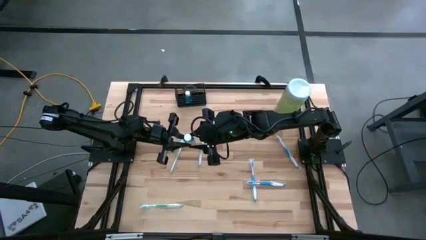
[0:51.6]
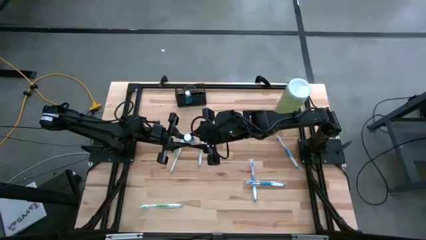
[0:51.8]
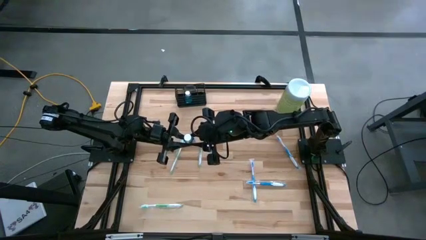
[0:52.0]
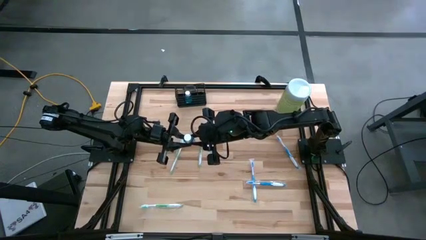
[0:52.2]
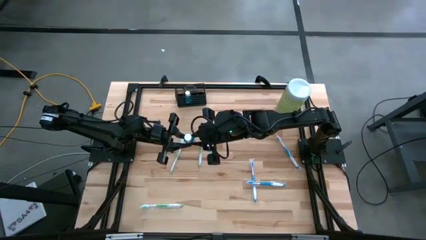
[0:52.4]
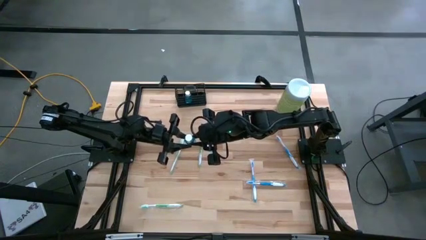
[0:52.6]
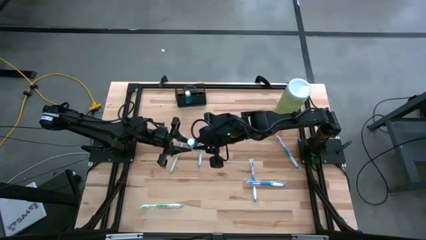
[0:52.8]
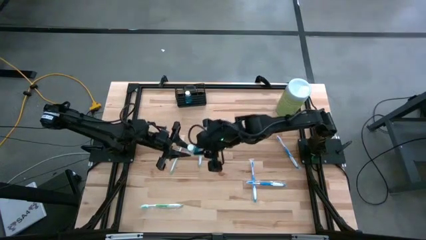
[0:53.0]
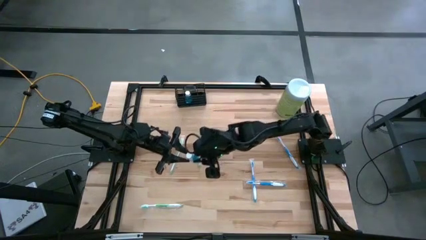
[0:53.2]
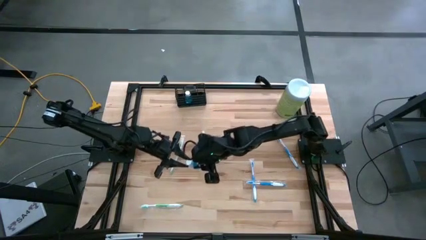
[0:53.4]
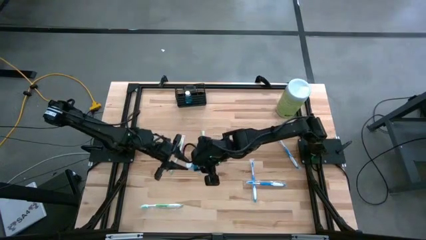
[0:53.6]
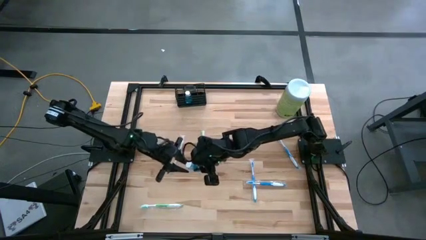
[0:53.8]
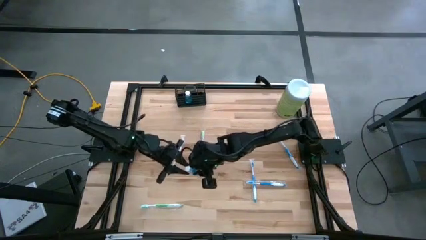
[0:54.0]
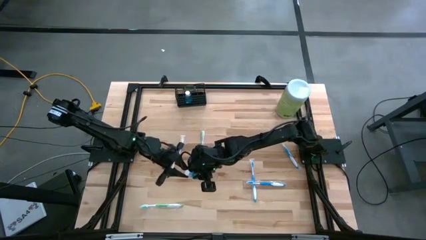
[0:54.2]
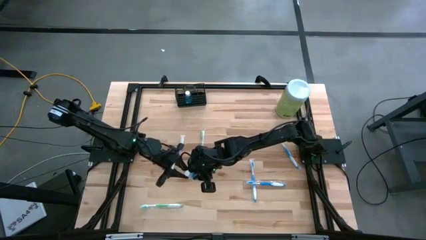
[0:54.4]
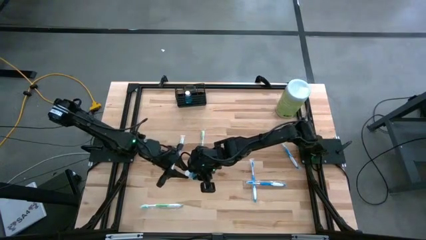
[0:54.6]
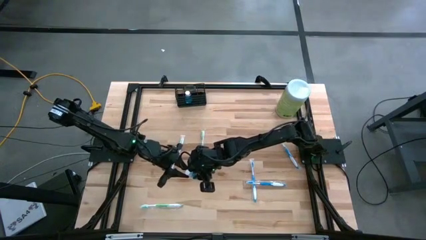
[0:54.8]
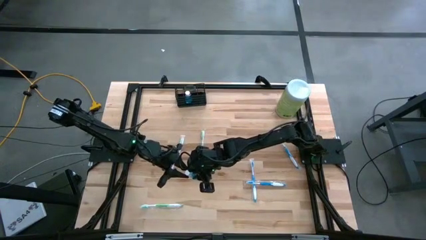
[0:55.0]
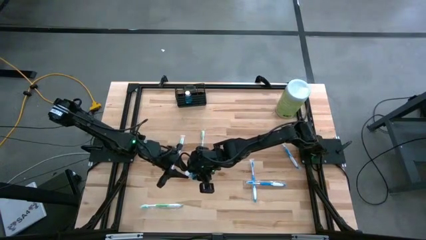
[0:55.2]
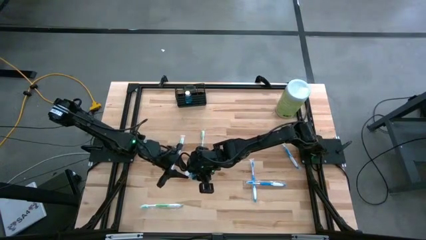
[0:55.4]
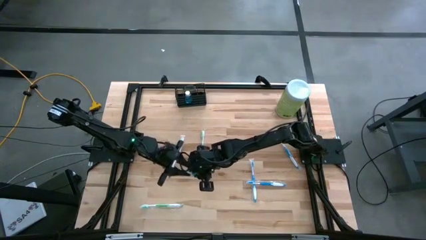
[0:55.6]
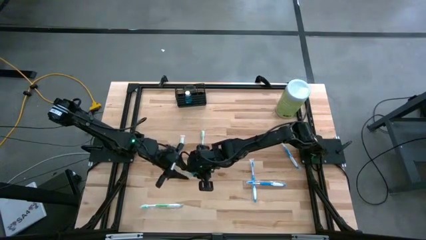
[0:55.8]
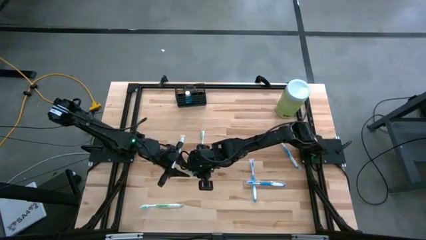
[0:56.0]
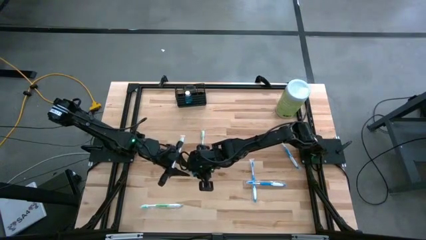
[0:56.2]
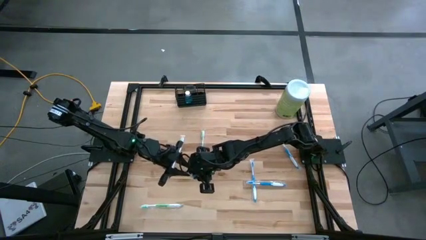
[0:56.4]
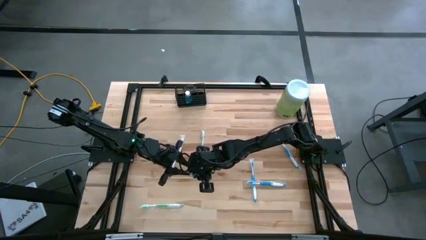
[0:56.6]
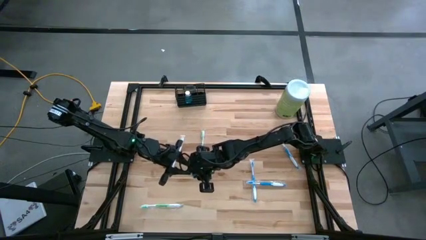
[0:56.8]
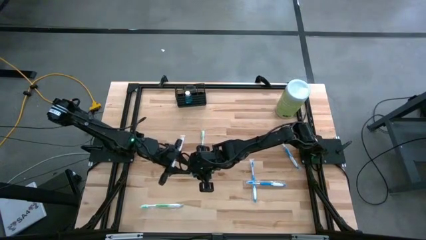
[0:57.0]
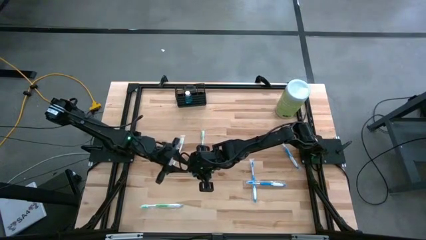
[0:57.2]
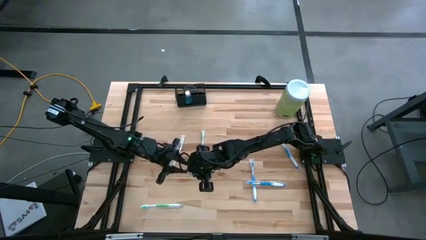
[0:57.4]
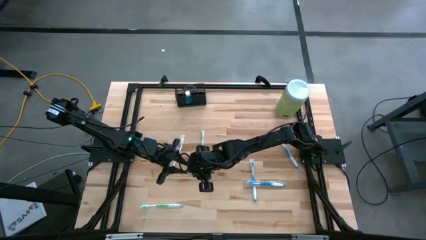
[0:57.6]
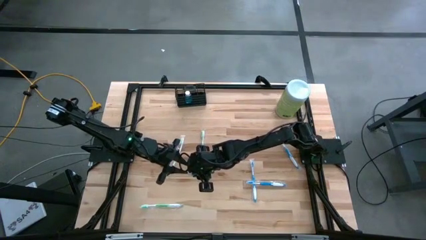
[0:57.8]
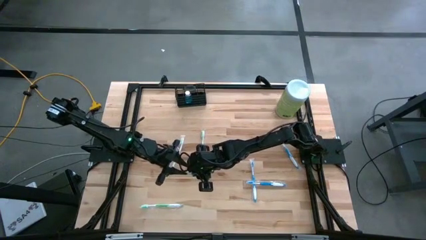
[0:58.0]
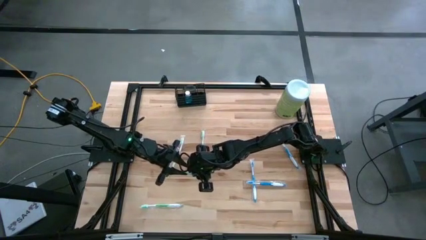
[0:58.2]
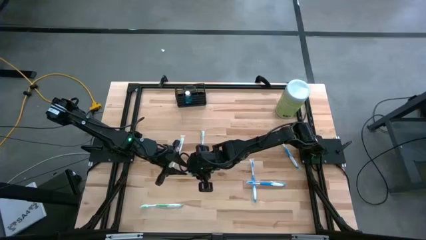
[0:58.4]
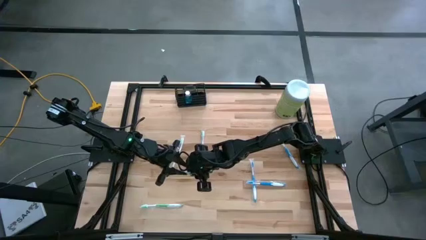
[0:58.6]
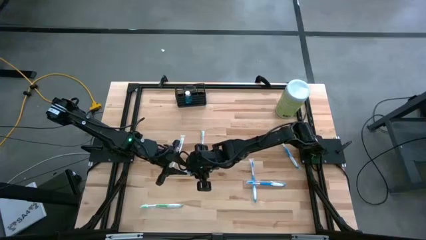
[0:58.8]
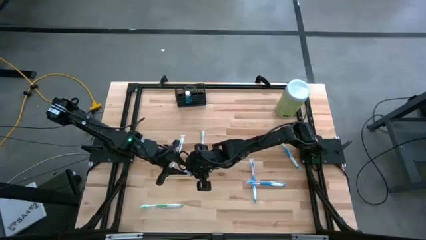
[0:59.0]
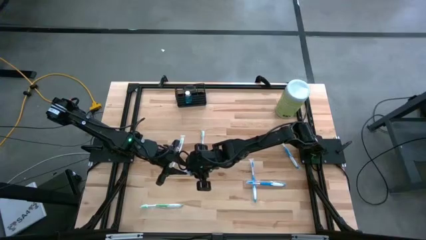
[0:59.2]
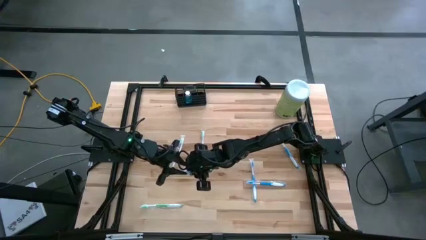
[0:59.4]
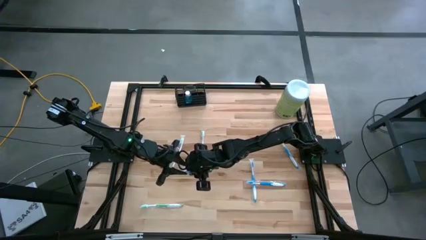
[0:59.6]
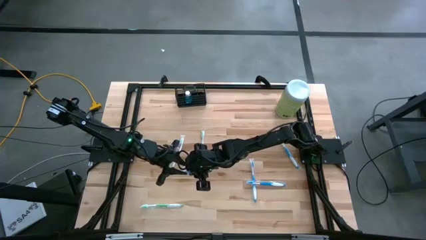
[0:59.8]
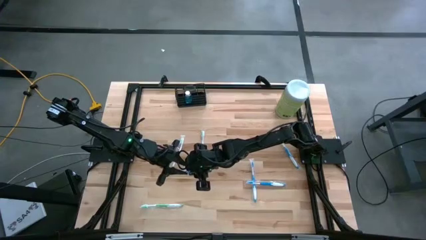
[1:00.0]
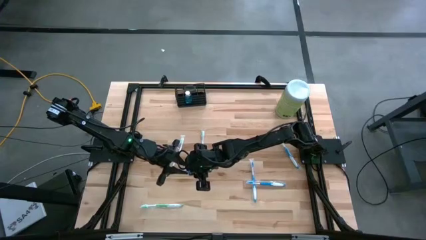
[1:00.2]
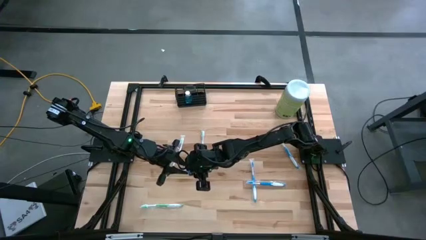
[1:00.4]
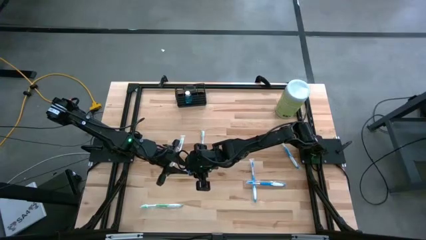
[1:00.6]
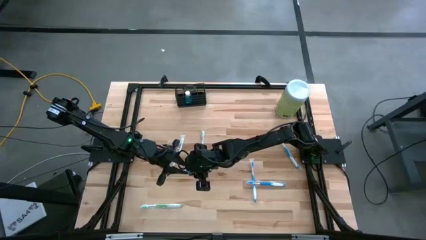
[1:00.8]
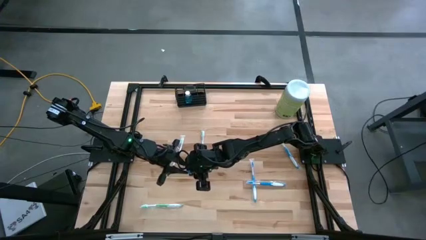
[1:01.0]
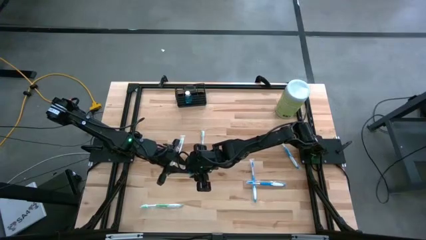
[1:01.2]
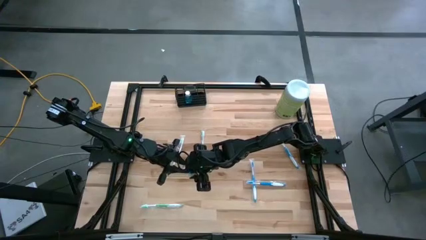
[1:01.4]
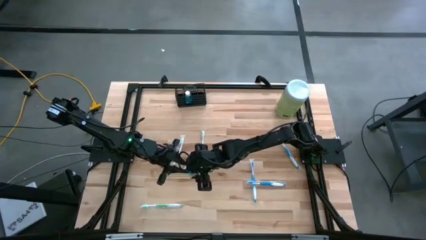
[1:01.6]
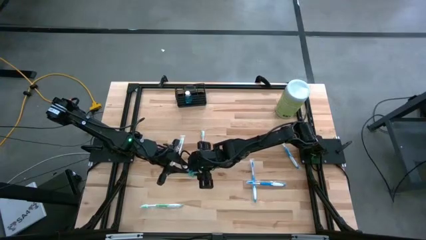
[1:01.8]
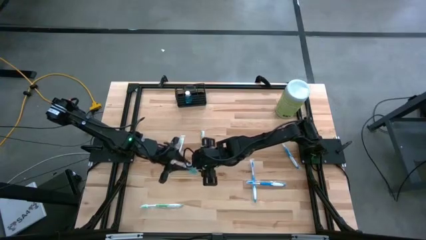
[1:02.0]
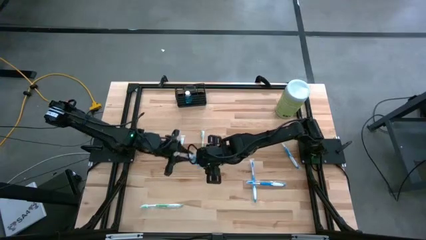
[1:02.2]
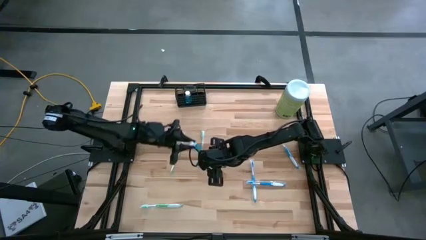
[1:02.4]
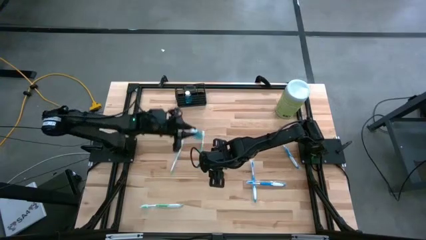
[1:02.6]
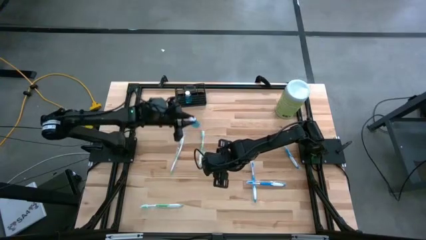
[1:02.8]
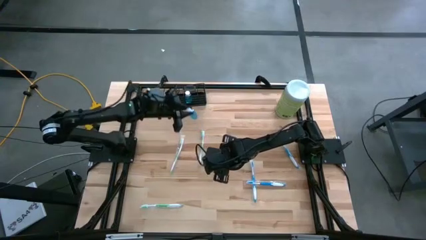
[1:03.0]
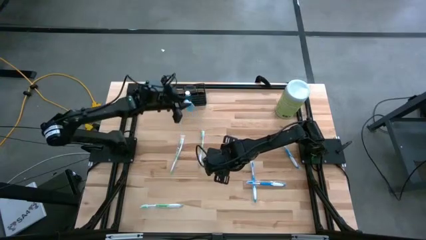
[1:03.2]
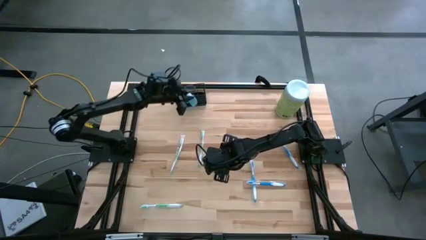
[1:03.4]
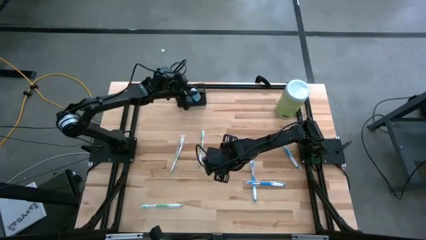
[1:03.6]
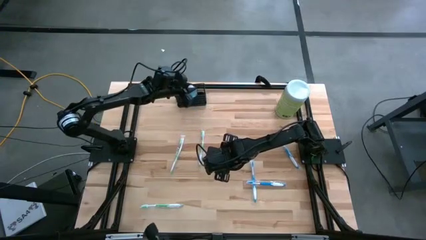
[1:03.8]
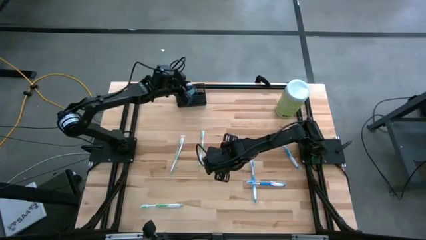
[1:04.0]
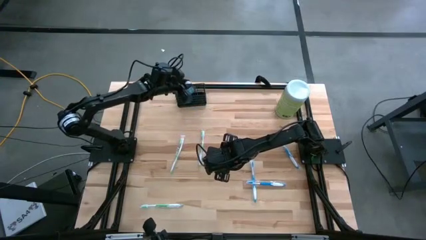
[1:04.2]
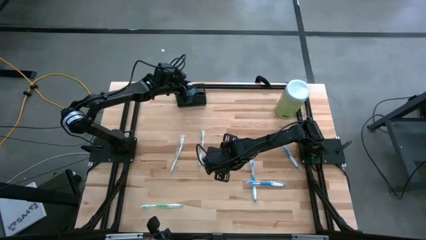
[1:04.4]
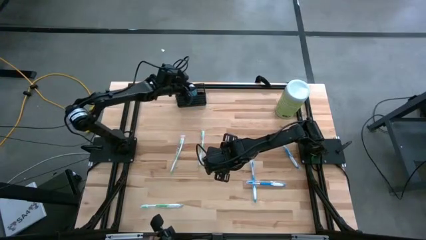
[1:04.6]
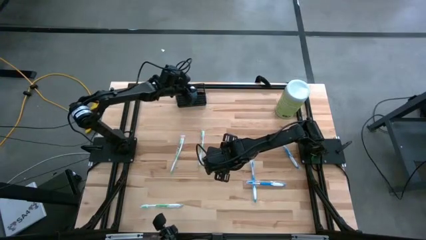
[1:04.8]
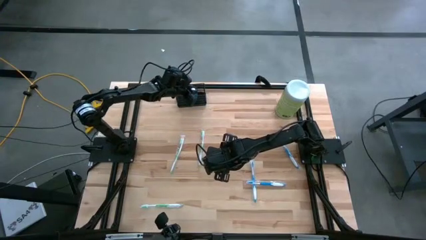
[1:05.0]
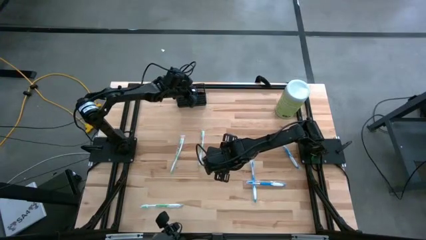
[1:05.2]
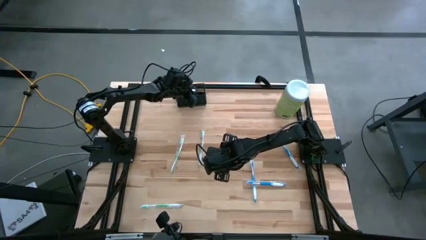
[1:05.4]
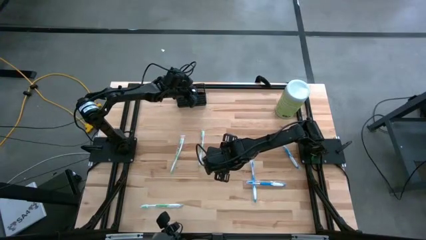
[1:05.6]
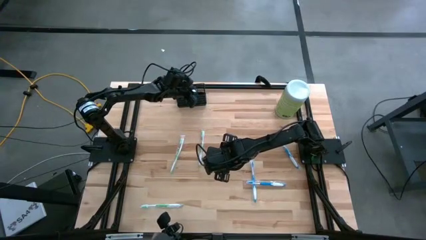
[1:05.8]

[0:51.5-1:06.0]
Task: Pick & Place toothbrushing station
Put the blue mouthwash bottle into the wire organizer
